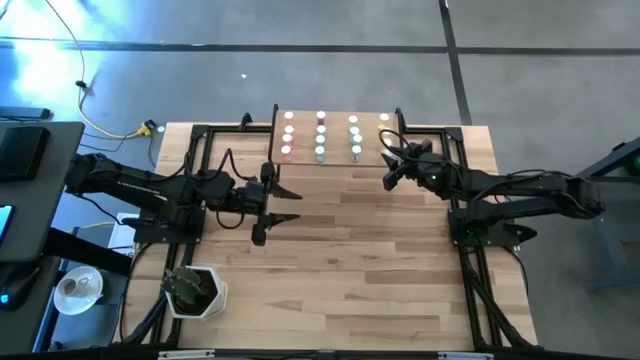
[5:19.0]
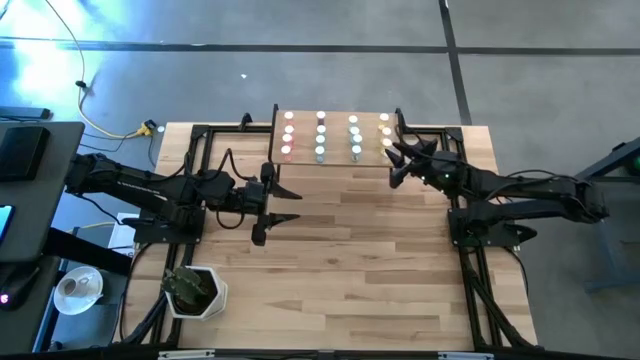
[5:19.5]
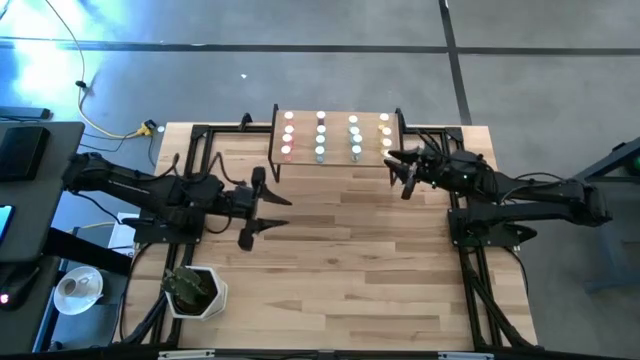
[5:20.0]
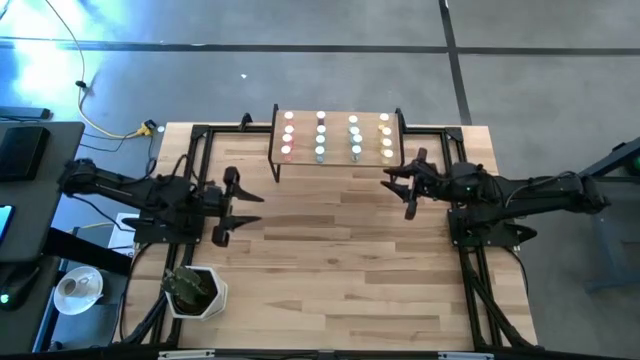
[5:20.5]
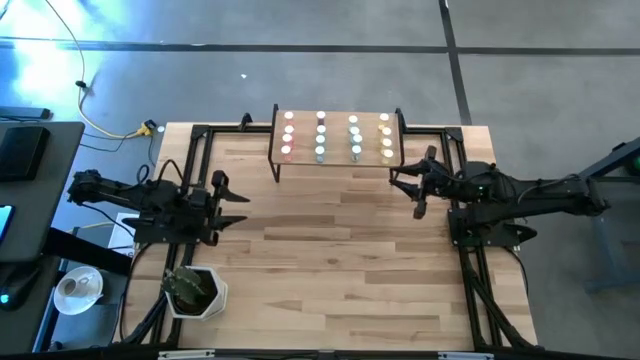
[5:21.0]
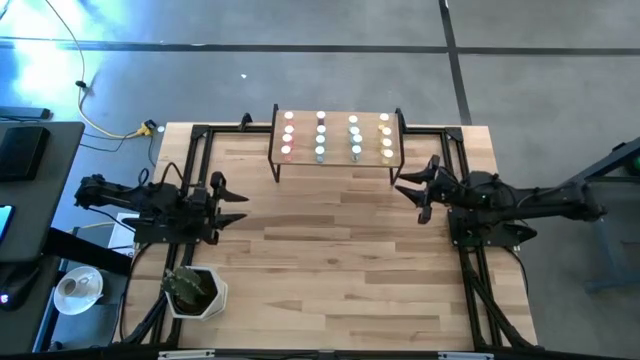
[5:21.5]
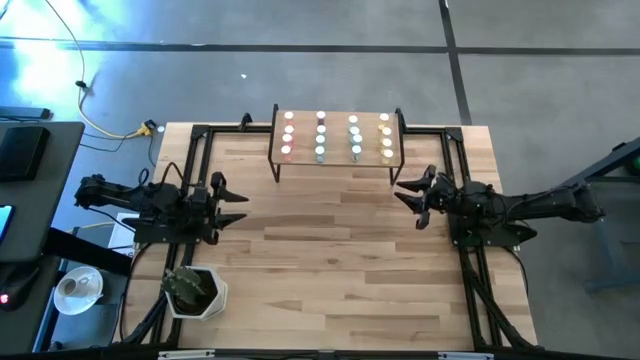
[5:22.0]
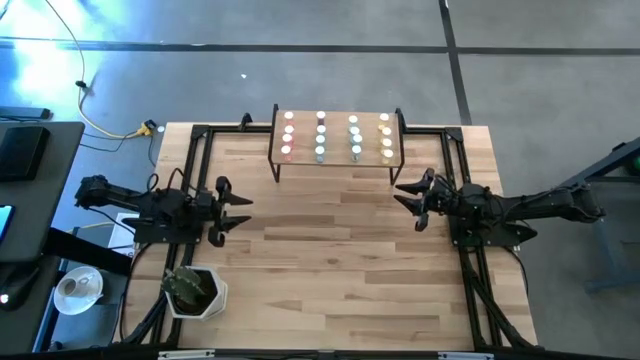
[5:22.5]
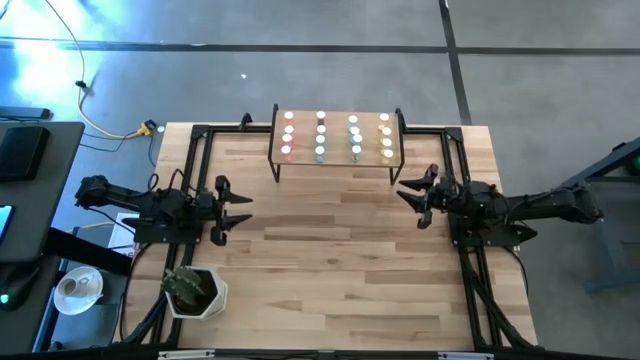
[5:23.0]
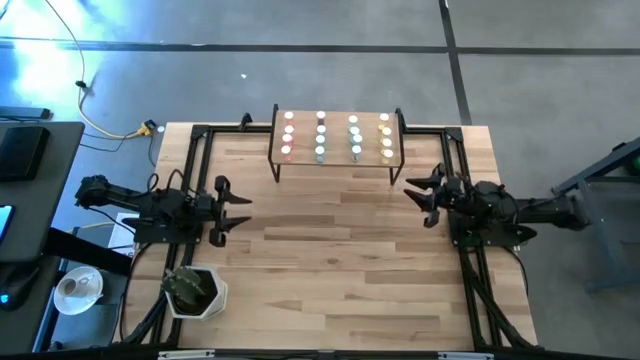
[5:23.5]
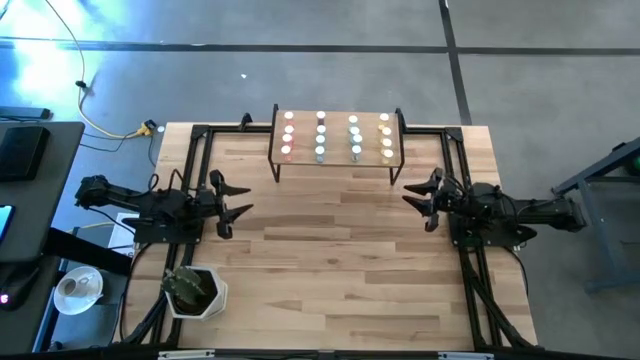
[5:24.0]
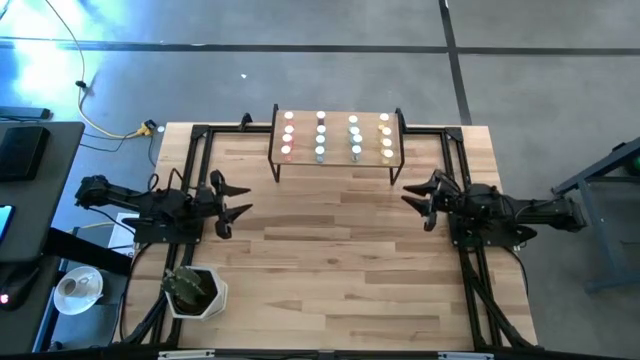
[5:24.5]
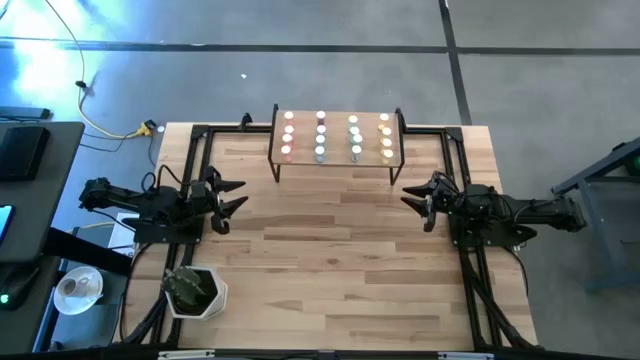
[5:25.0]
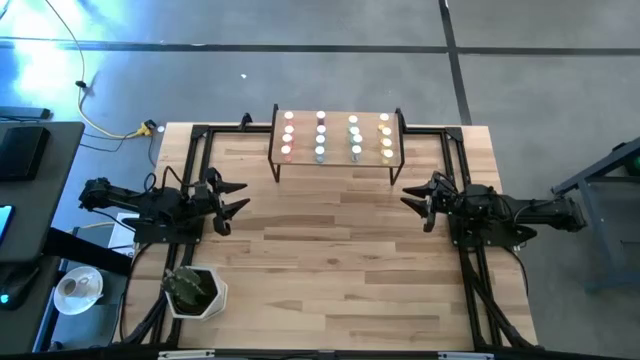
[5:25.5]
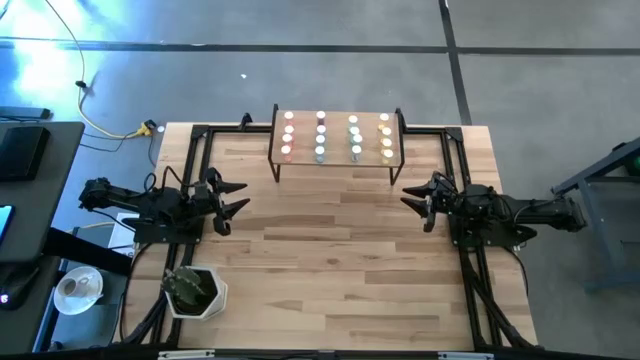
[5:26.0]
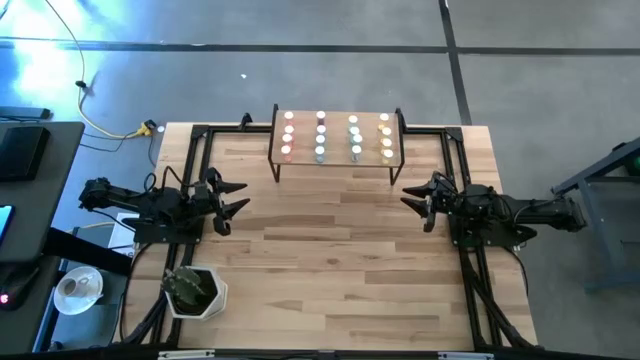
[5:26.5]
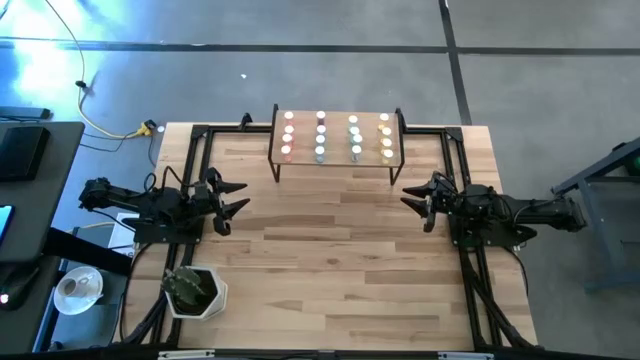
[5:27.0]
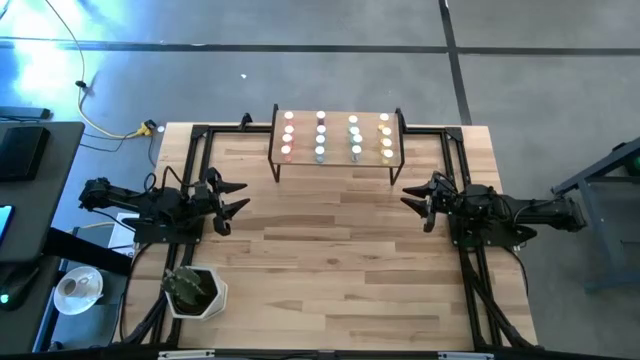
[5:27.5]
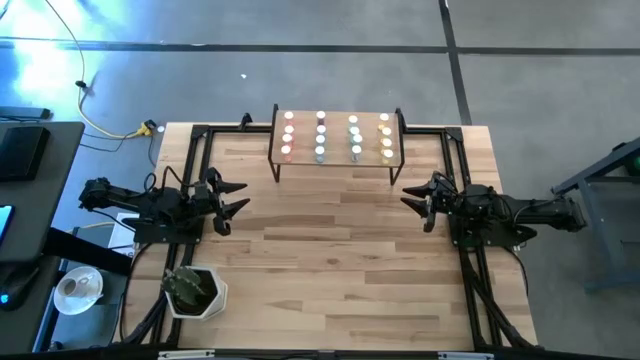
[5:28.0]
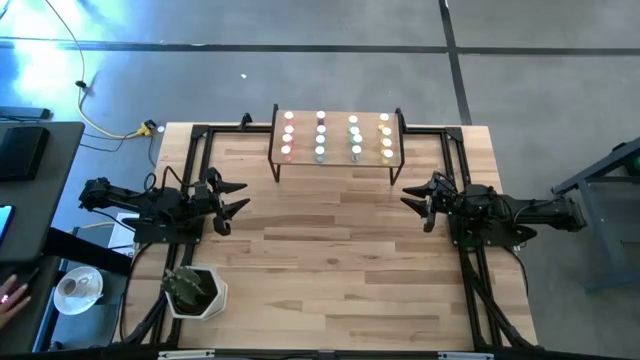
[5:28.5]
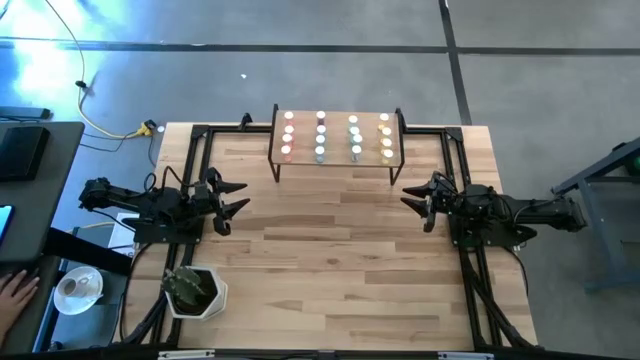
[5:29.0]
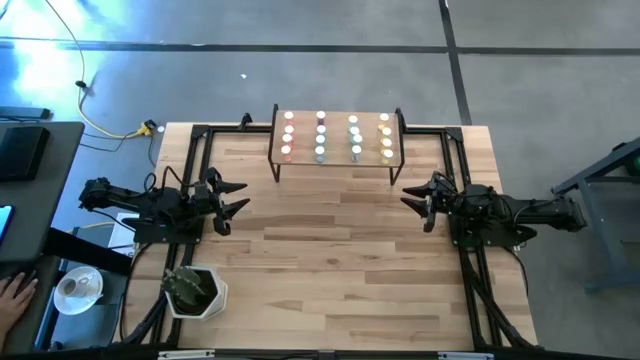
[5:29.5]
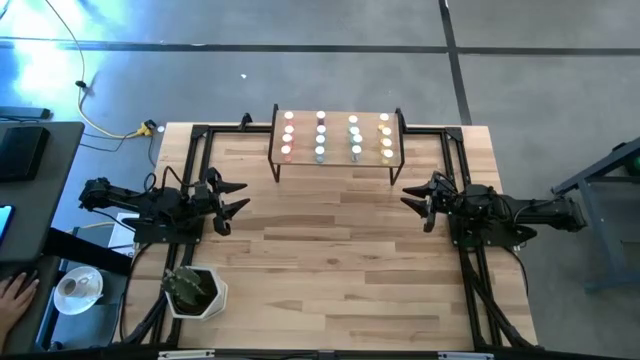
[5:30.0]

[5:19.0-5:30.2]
Task: Pick and place medicine bottles onto shelf by color
Return to Home Position

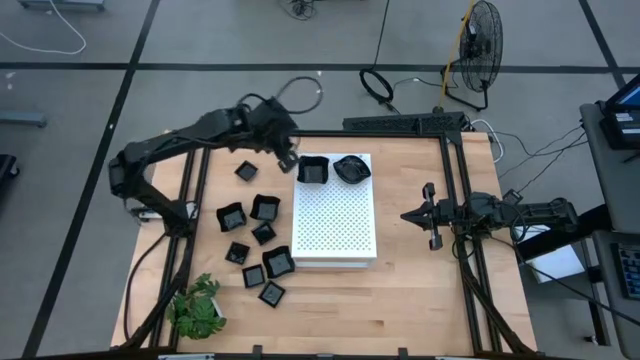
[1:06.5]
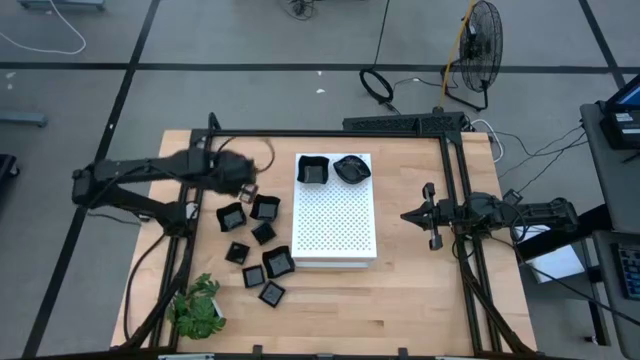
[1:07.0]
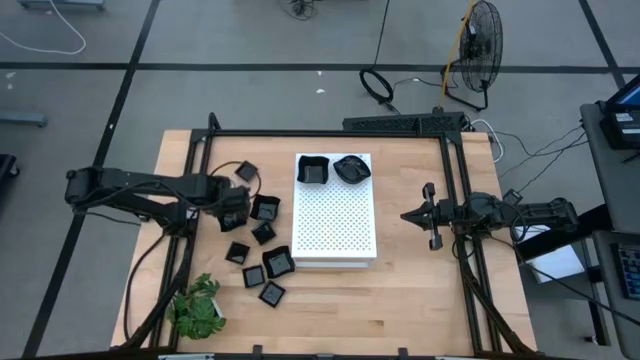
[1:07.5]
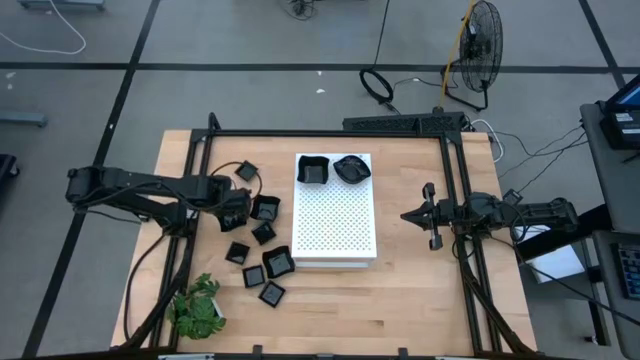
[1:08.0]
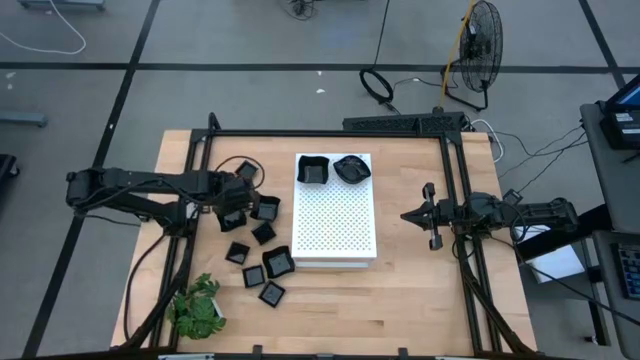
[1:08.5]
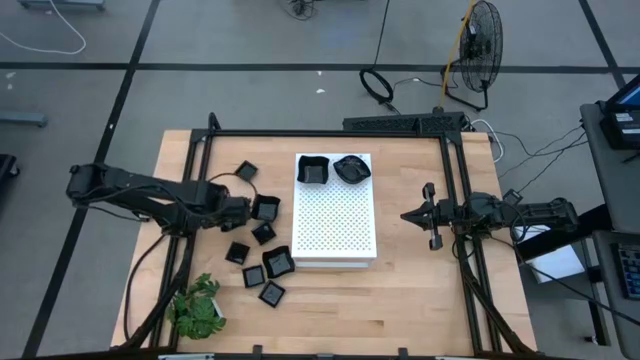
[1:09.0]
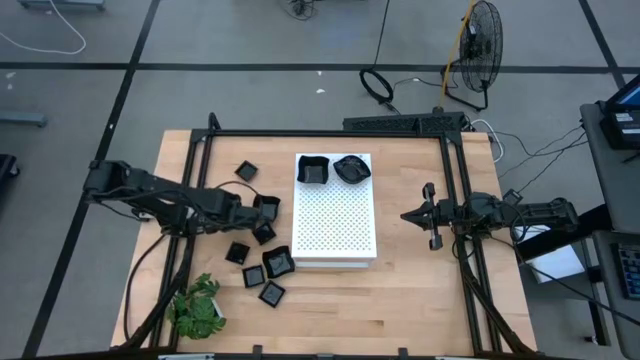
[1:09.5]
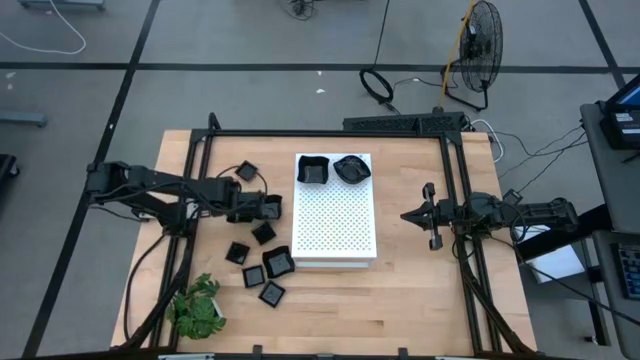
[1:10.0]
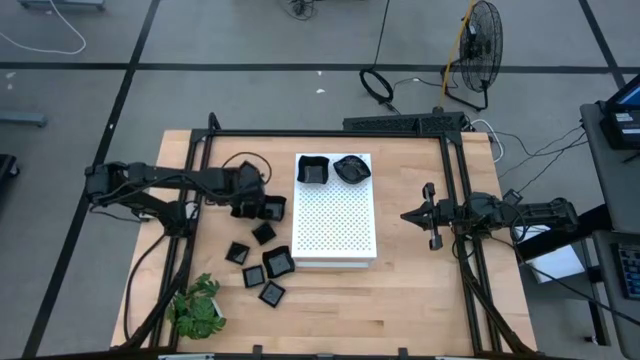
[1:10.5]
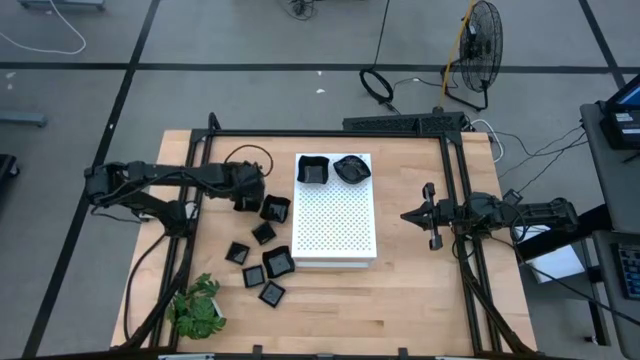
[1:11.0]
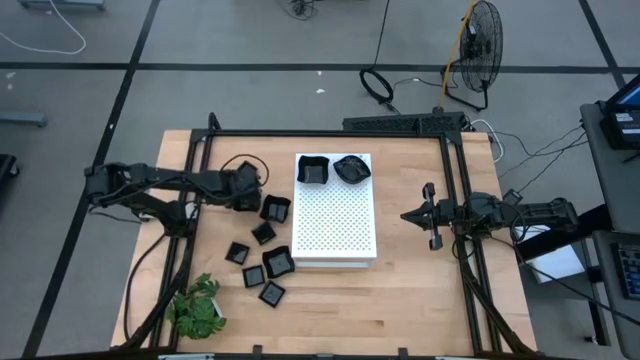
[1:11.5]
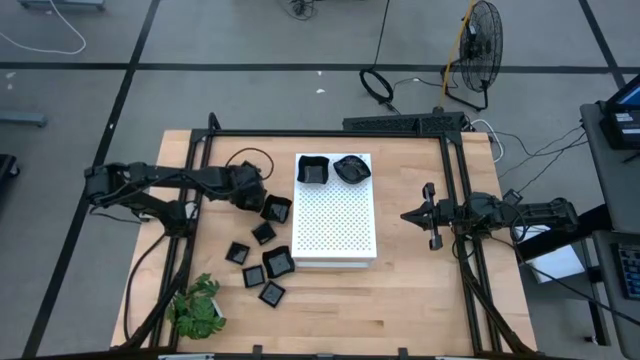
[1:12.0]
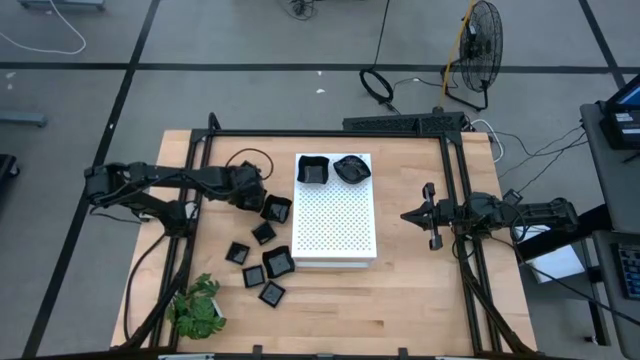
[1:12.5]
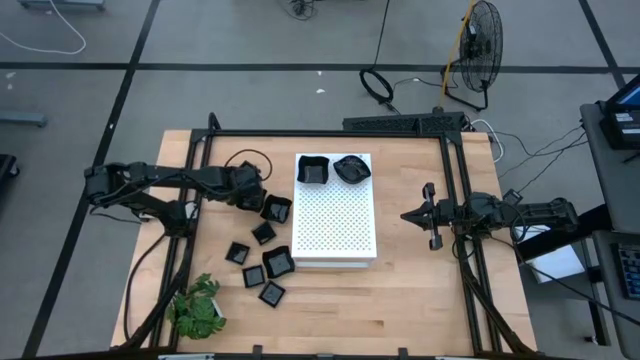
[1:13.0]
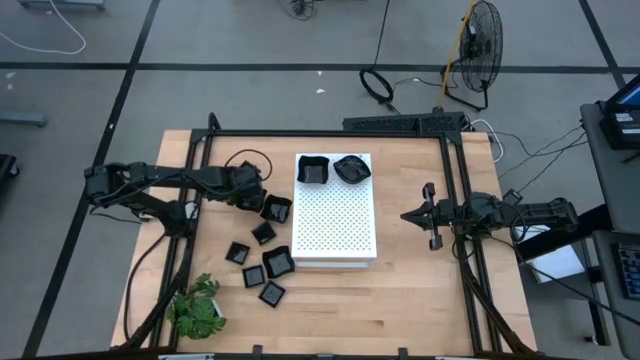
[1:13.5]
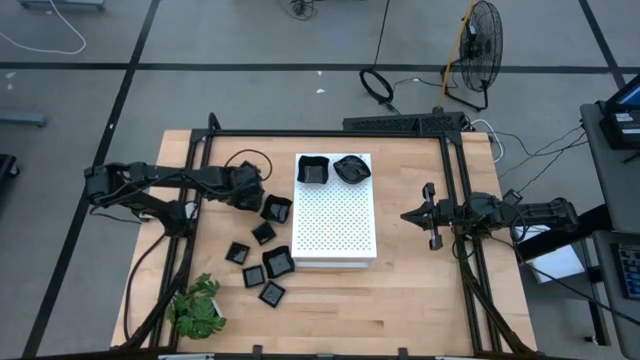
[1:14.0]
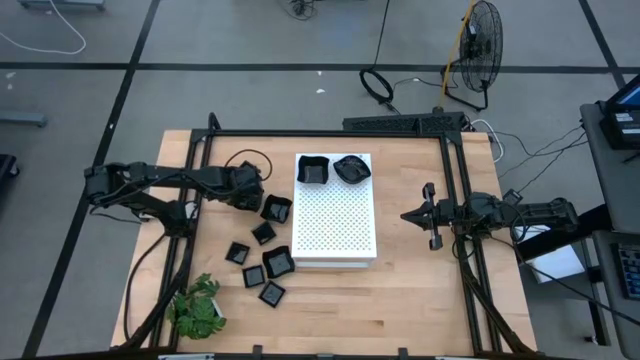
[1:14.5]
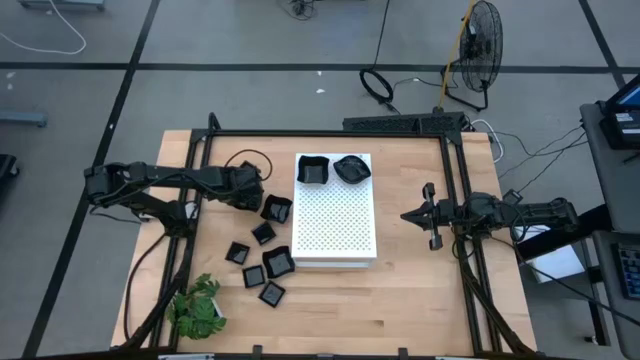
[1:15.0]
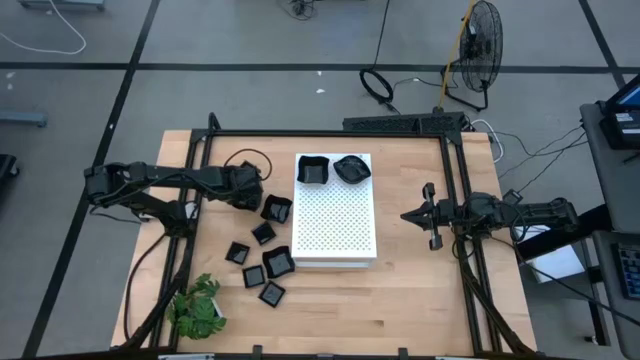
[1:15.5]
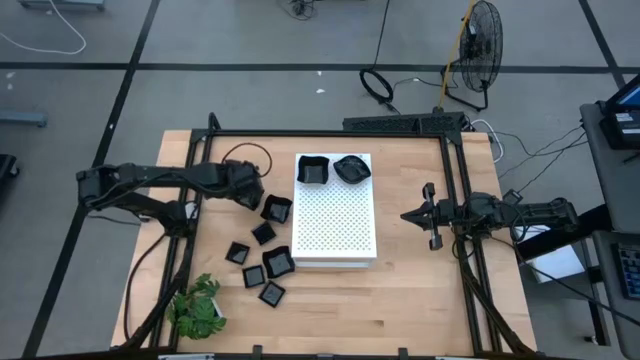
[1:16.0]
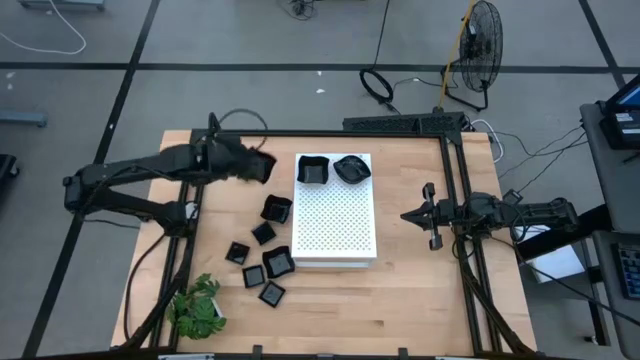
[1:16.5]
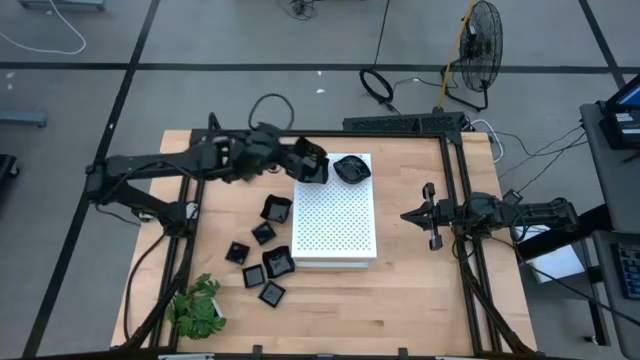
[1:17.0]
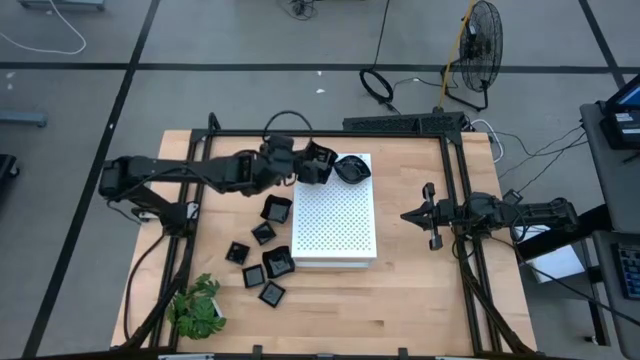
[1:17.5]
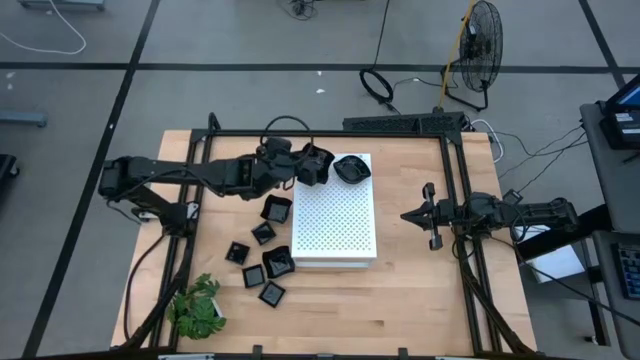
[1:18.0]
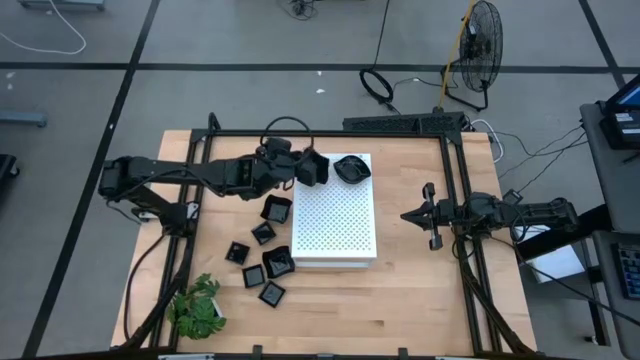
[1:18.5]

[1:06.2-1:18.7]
Task: Pick & Place Mini shaped plates
Stack the black distorted square plate on top of the other black distorted square plates on the shelf
